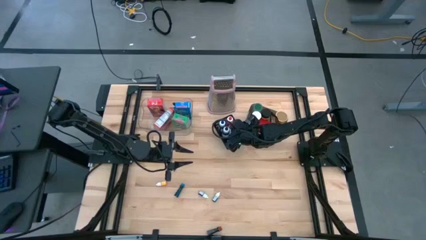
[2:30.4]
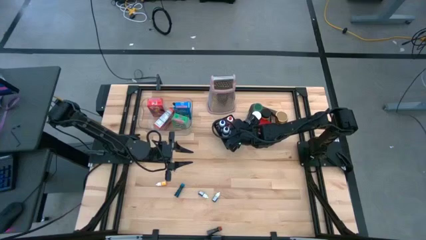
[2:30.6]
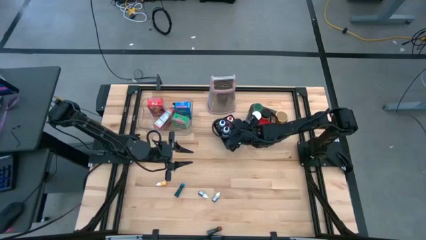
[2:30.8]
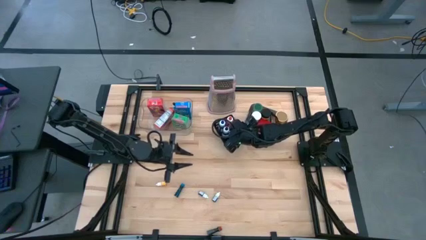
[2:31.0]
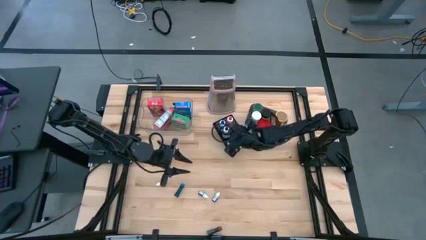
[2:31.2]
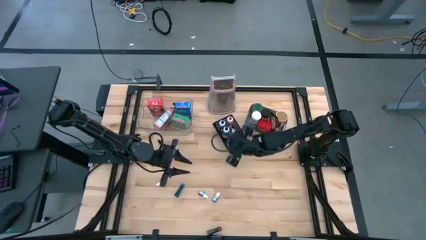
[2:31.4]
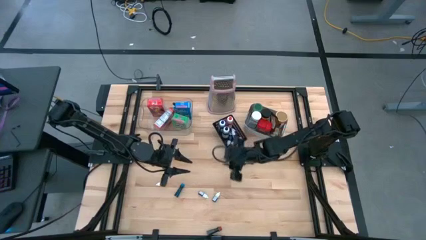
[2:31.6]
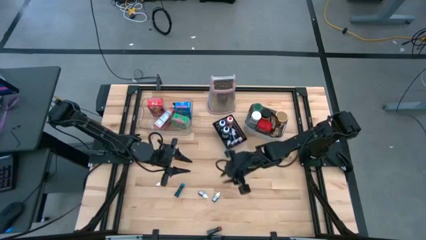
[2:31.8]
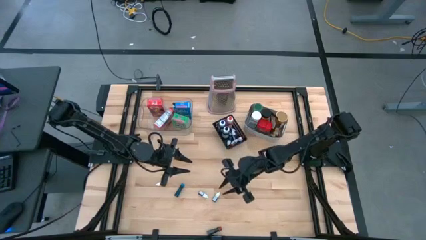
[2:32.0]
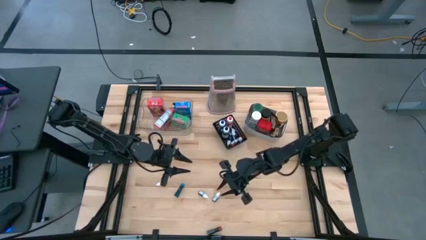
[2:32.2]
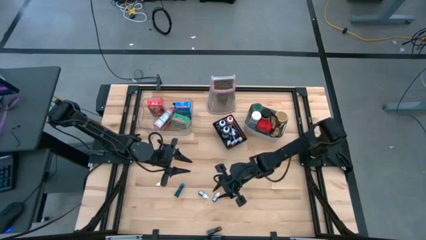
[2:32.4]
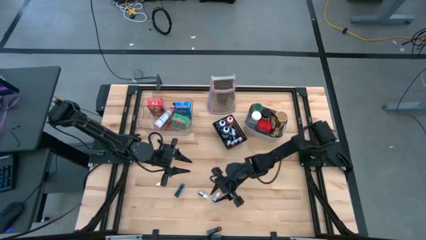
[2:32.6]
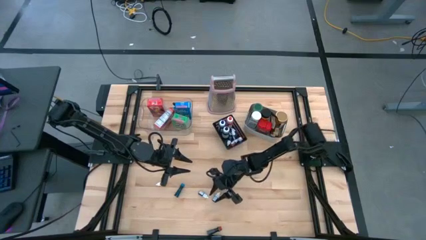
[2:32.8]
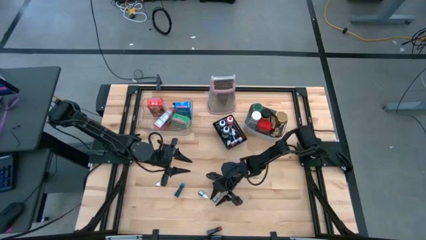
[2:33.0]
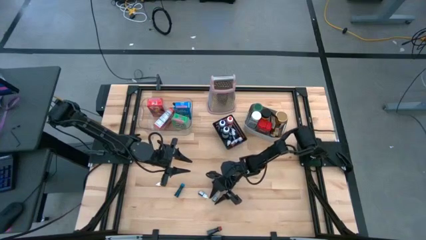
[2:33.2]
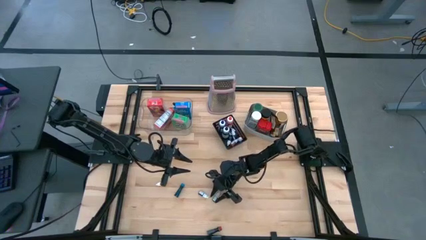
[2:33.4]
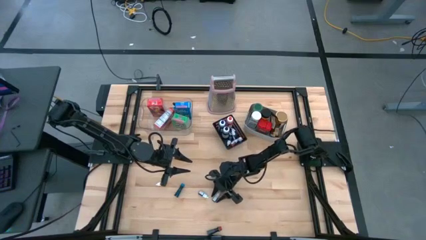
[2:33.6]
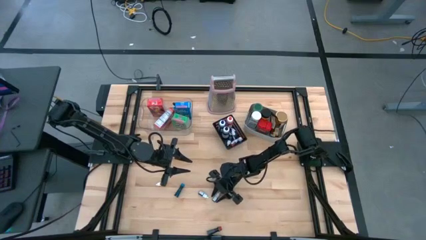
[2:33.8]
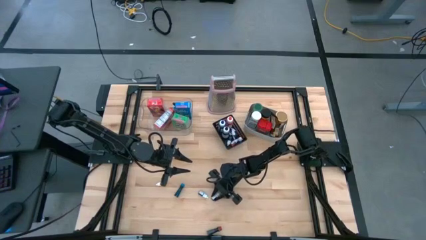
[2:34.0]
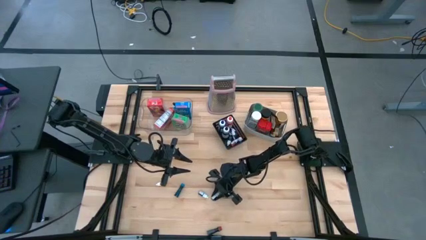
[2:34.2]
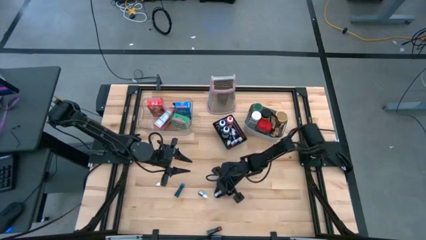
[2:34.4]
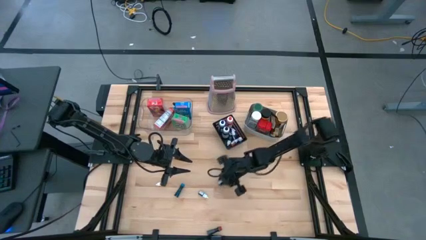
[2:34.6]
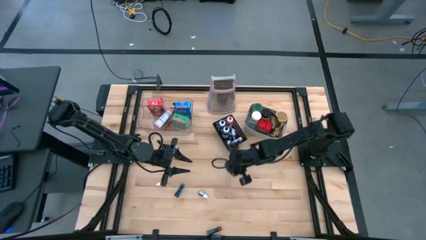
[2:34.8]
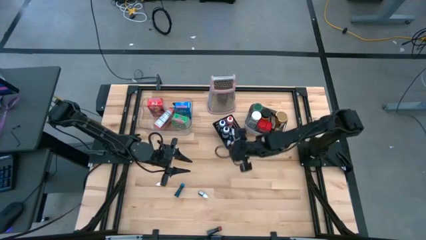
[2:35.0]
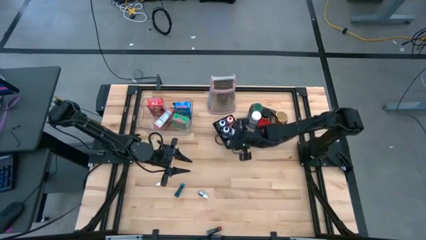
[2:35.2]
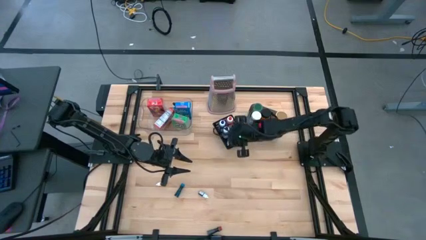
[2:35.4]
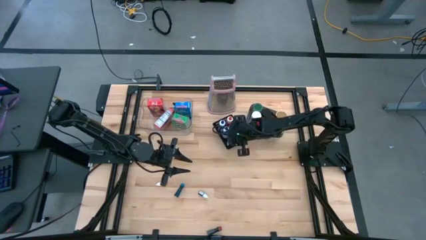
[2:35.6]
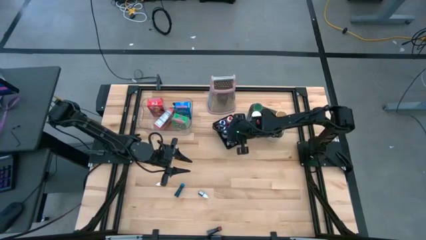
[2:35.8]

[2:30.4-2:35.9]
Task: Pick & Place Kitchen Items
Put the small black food coloring bottle into the black bin

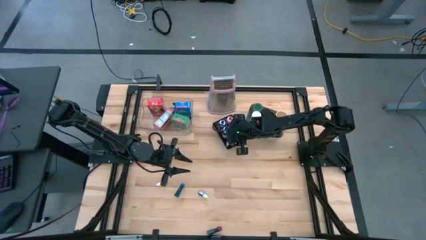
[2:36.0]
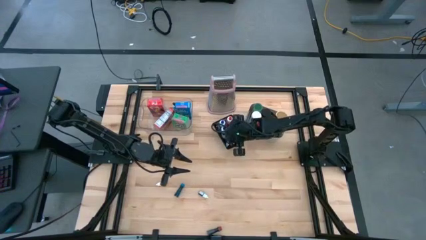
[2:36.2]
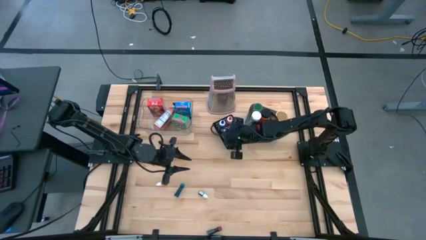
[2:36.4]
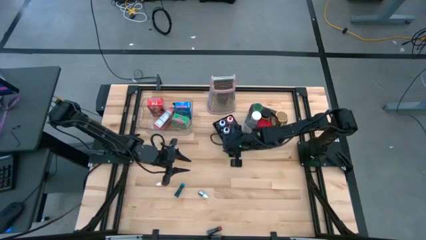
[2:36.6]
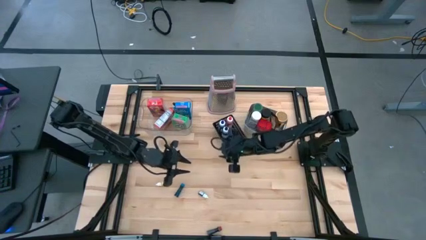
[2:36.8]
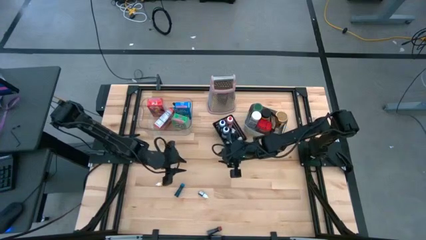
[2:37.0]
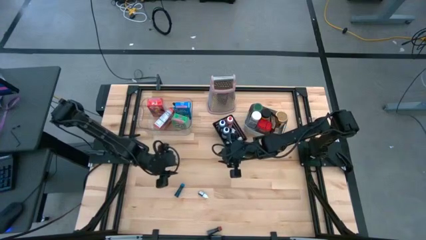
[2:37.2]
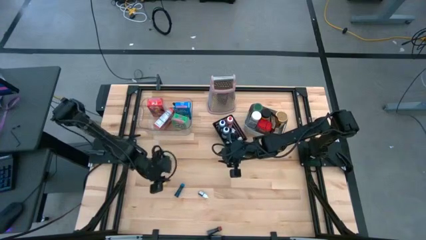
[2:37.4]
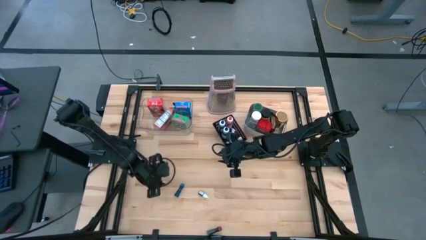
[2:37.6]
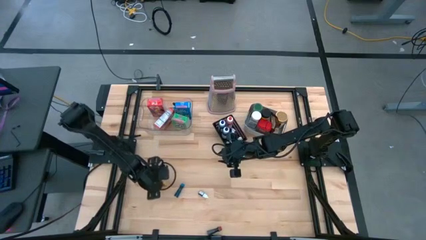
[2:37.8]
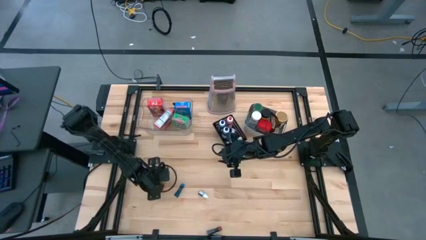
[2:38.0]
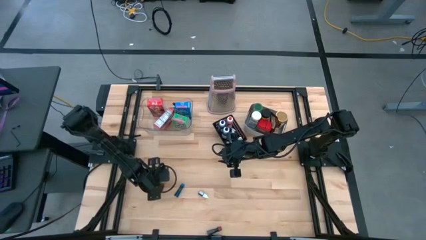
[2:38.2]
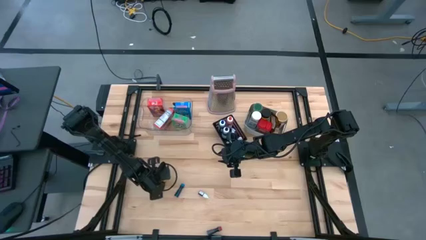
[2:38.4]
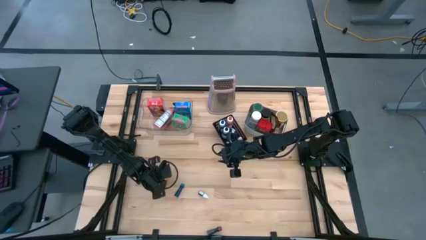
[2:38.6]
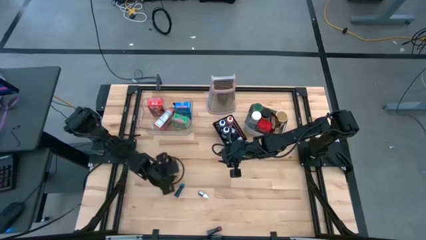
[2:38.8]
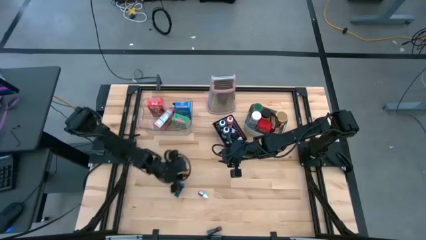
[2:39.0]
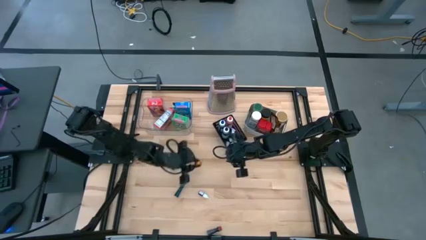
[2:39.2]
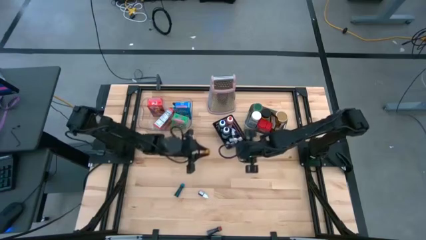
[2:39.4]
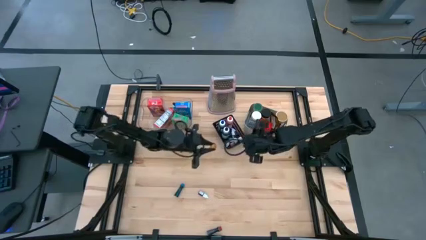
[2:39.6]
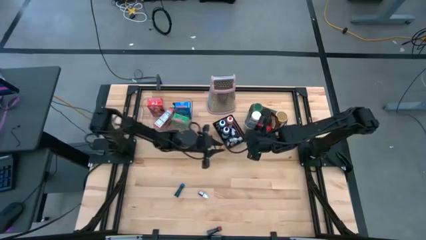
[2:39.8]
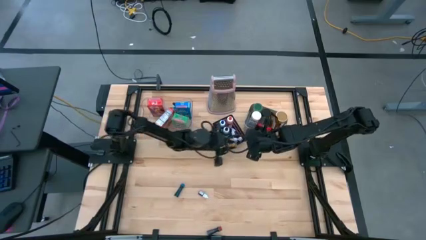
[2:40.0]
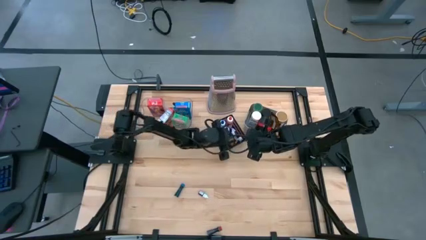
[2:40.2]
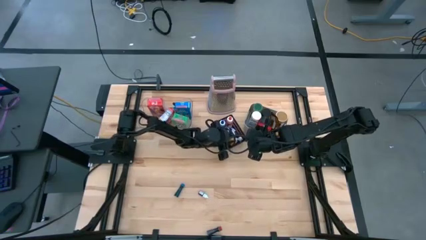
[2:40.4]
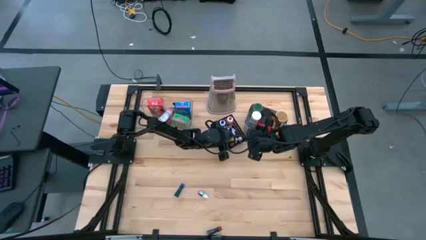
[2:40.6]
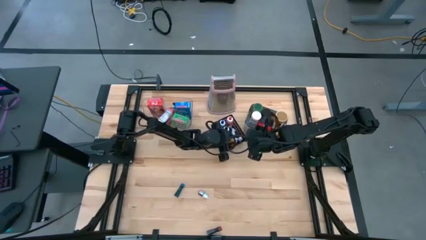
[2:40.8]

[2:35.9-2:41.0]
Put the small orange food coloring bottle into the black bin

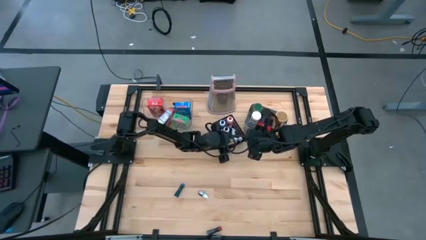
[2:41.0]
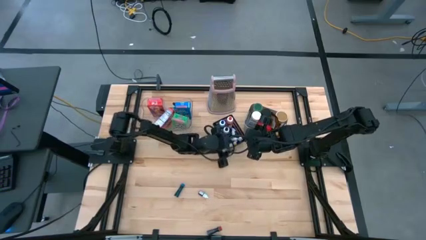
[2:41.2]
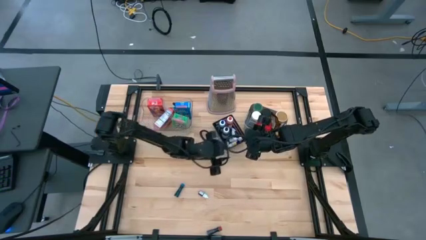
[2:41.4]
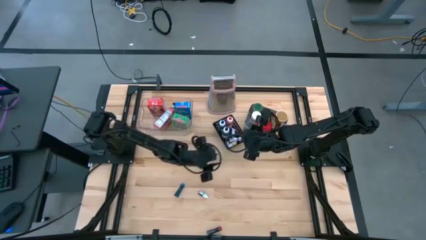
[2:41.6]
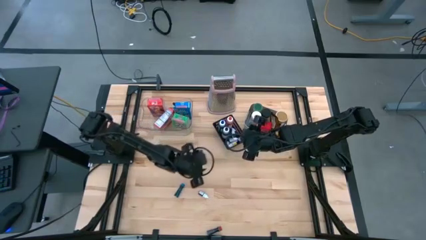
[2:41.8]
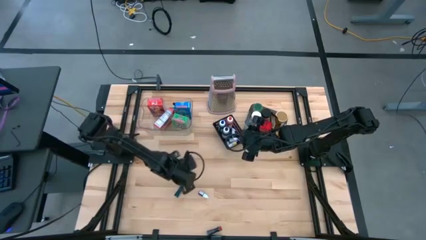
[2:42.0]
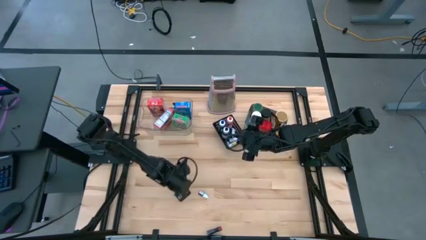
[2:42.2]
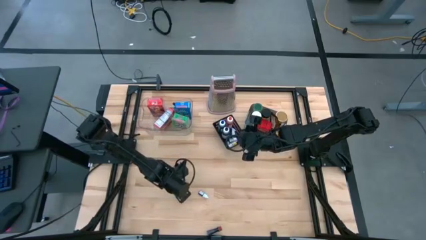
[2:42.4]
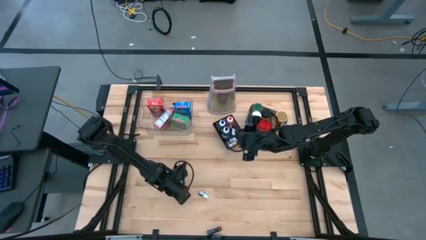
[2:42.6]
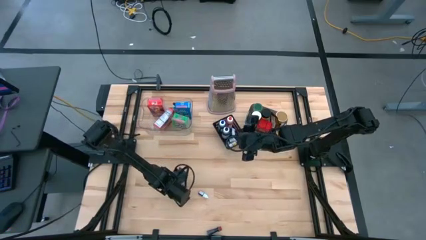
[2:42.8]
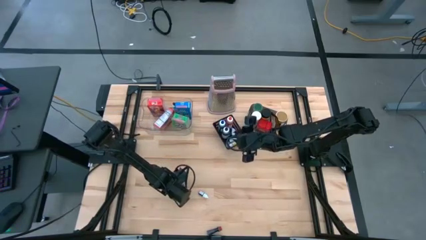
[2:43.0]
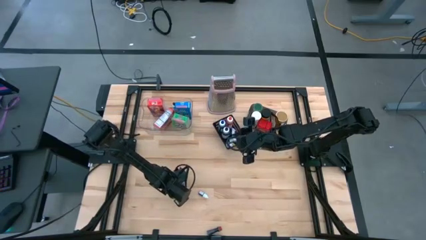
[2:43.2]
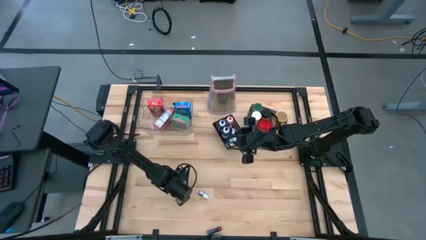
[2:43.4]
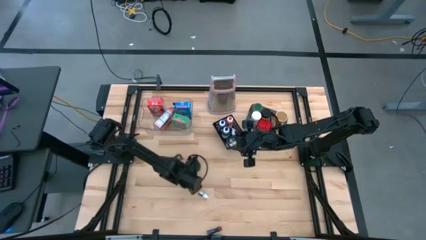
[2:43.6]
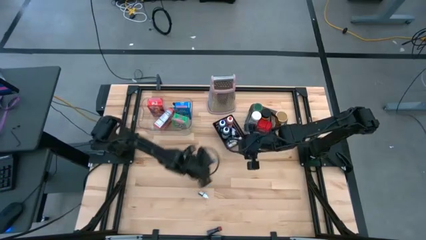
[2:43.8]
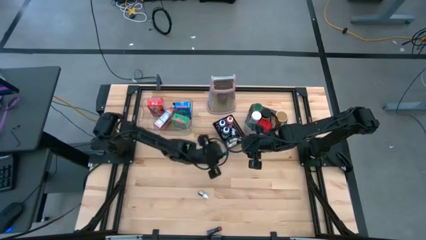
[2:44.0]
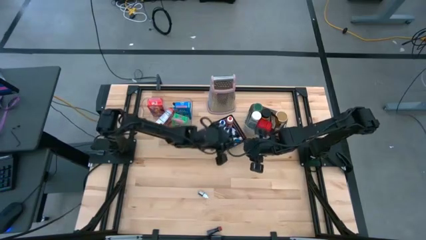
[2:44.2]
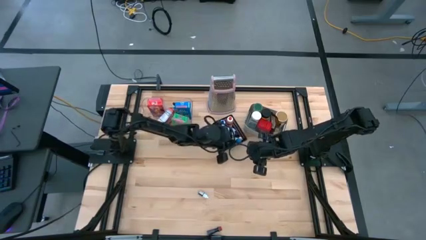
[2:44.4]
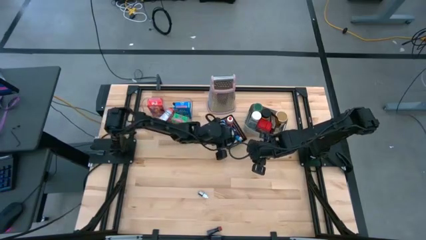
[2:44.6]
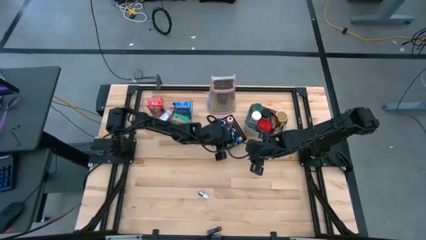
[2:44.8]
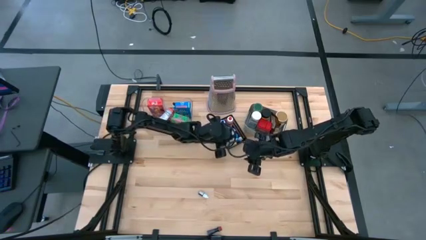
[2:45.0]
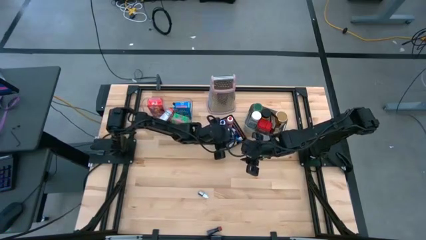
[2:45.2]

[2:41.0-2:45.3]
Put the small blue food coloring bottle into the black bin

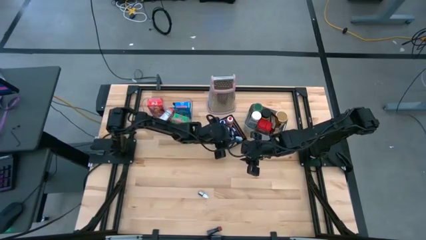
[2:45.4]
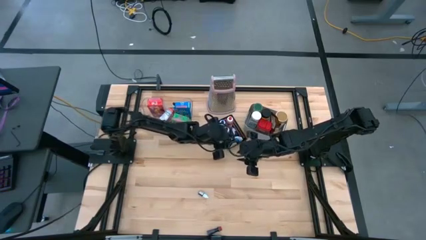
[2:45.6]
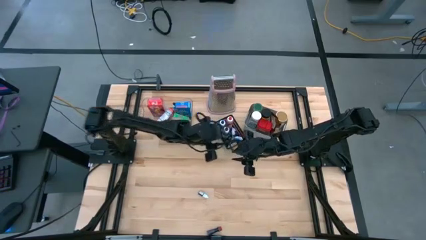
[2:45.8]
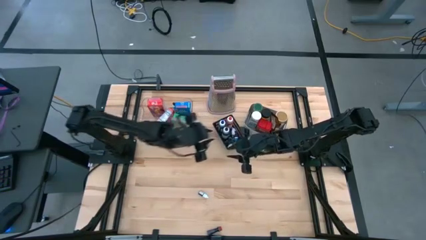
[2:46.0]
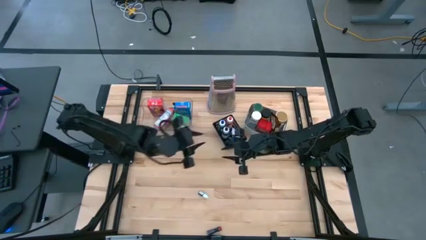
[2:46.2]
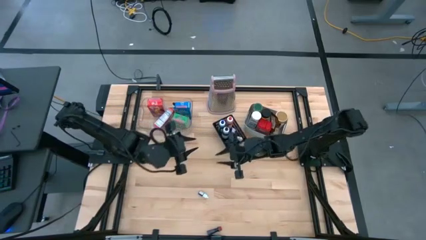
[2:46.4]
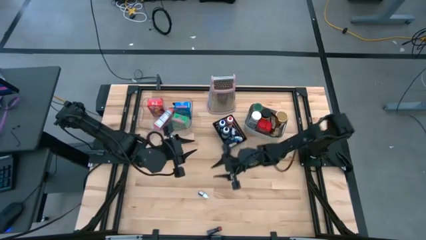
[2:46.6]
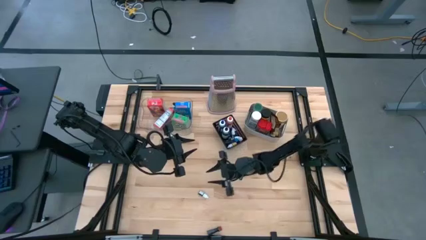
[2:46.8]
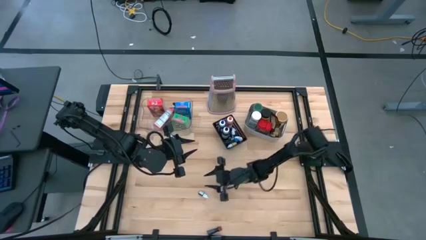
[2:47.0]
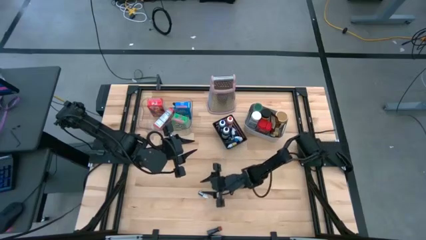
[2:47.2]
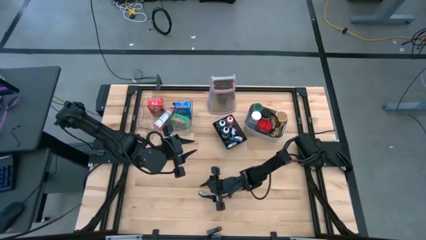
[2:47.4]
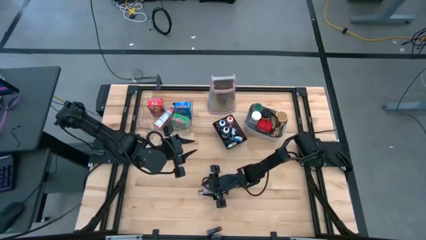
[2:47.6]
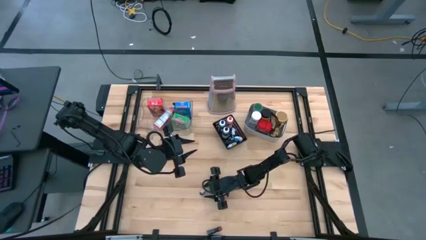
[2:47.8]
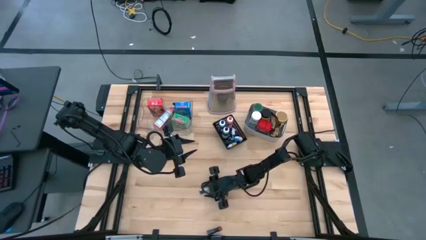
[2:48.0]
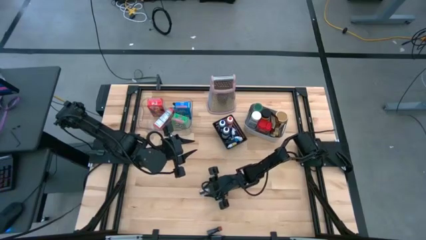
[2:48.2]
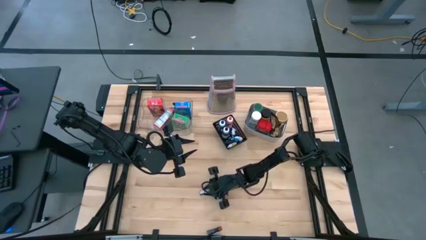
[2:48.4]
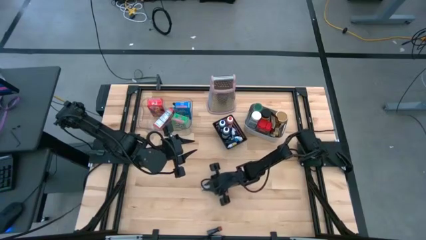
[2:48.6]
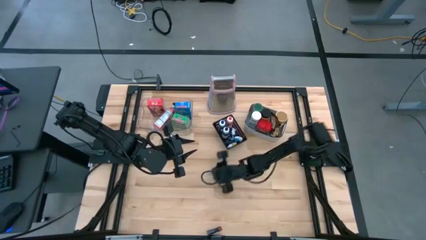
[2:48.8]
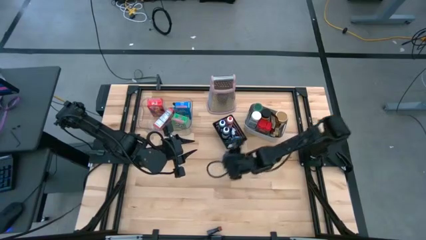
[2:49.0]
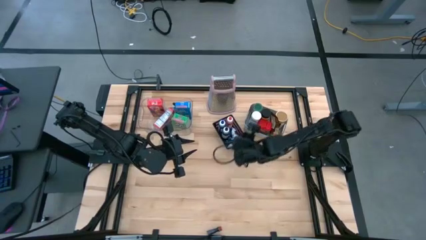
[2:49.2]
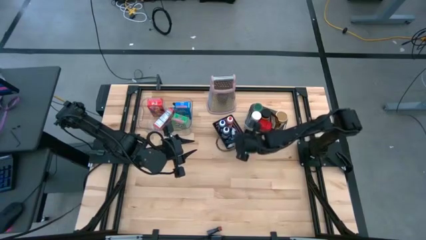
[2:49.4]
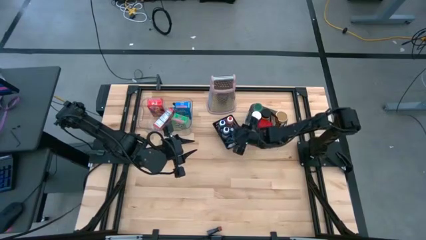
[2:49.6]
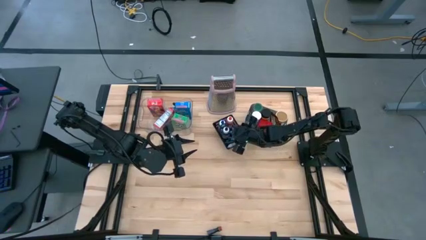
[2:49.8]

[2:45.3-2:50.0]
Put the small black food coloring bottle into the black bin
